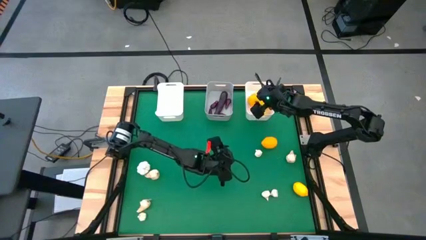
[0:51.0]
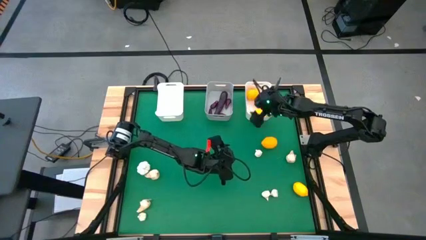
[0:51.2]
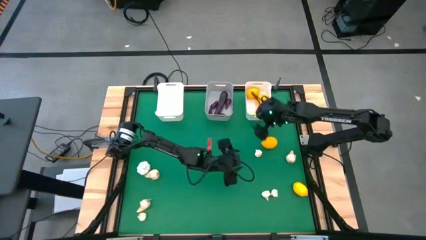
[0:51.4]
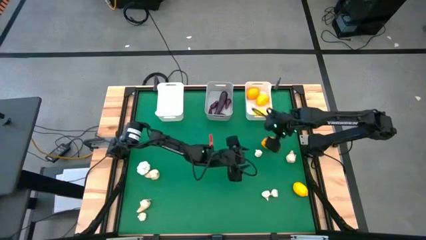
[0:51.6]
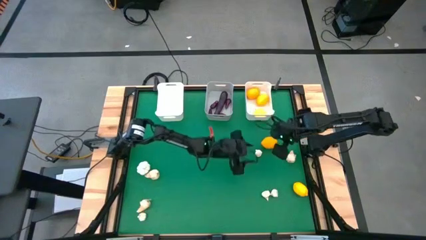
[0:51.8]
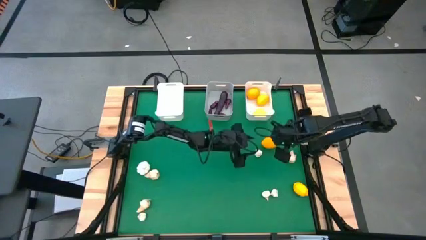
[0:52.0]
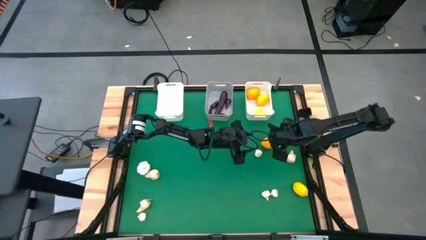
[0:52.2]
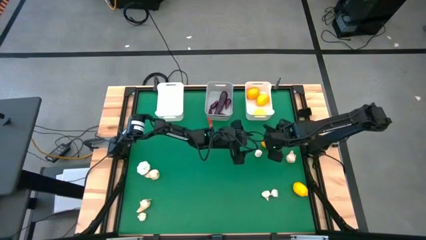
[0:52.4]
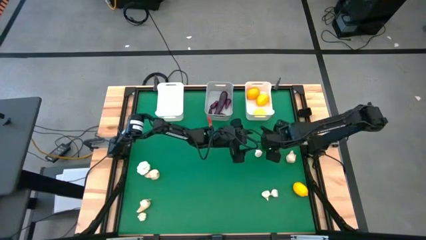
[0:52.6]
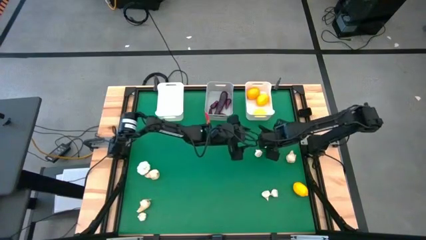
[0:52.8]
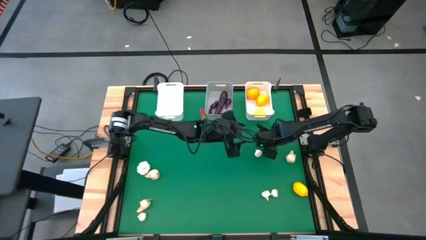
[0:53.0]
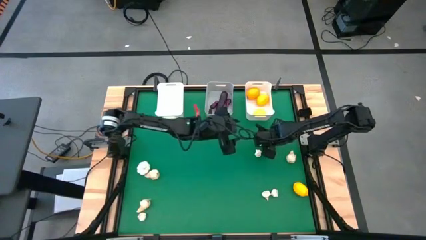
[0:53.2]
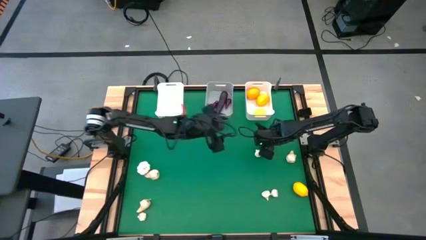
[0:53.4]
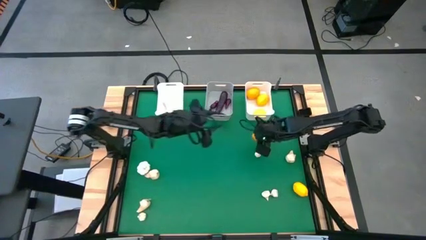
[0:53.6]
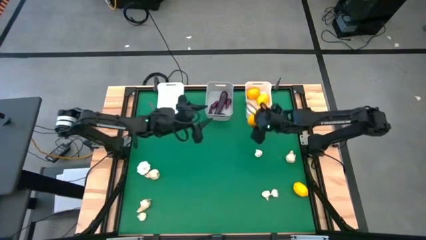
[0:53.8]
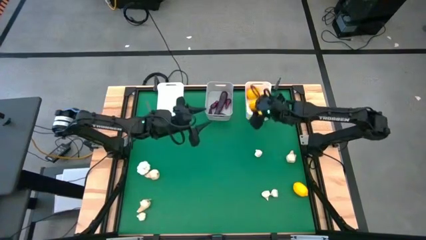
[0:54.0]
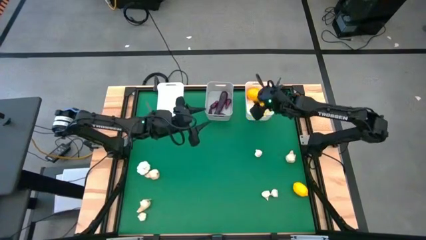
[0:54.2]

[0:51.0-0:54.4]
Task: Sort produce into baskets
Put the lemon into the right white bin

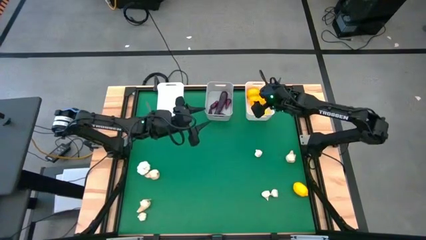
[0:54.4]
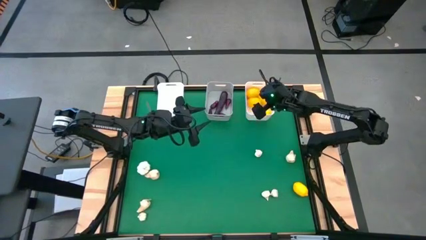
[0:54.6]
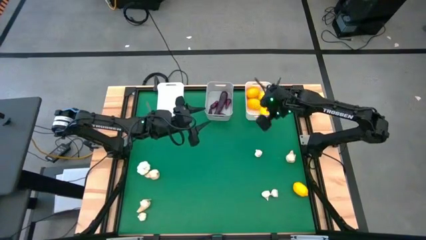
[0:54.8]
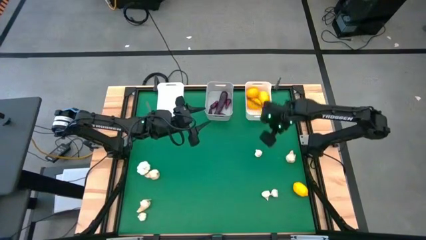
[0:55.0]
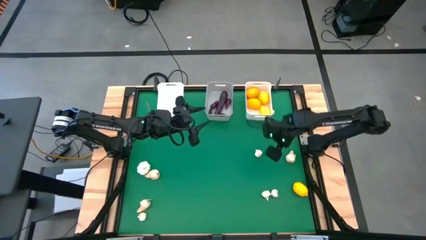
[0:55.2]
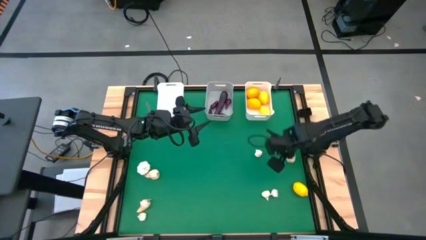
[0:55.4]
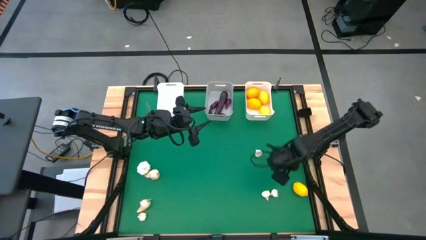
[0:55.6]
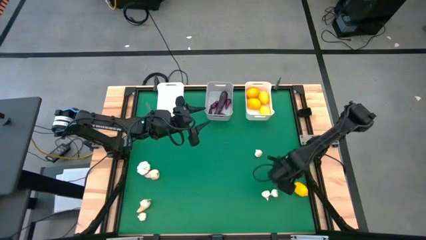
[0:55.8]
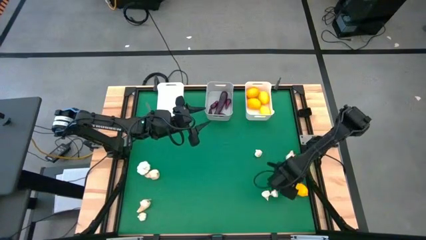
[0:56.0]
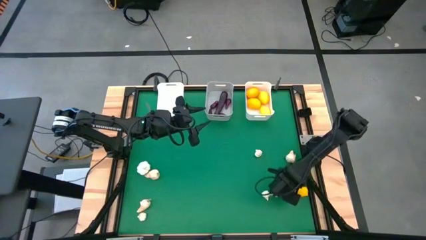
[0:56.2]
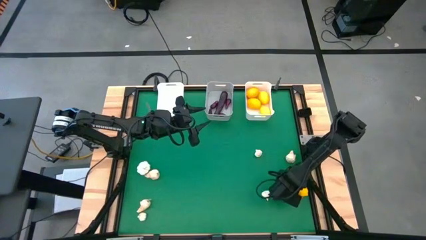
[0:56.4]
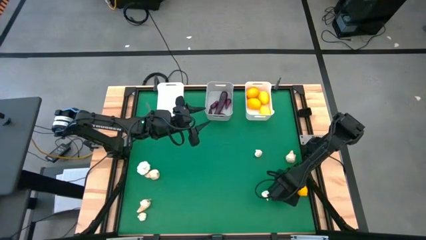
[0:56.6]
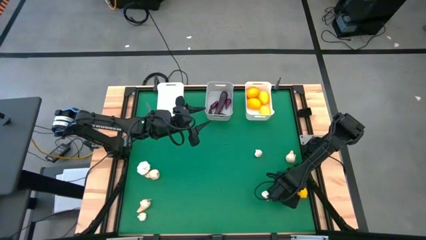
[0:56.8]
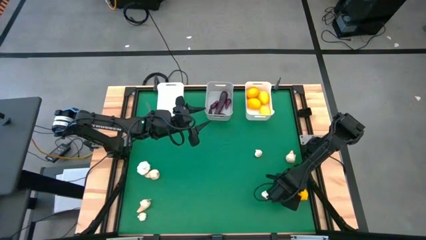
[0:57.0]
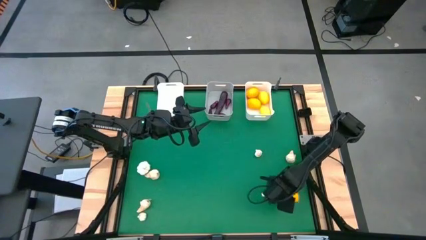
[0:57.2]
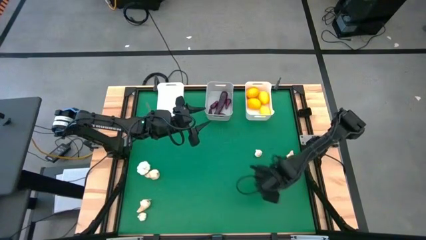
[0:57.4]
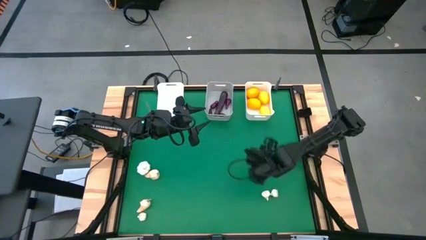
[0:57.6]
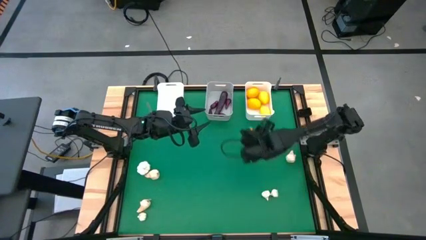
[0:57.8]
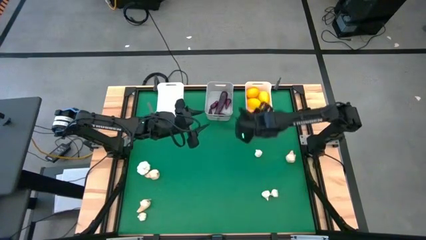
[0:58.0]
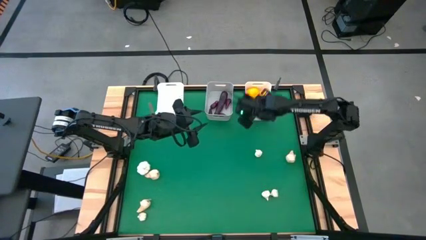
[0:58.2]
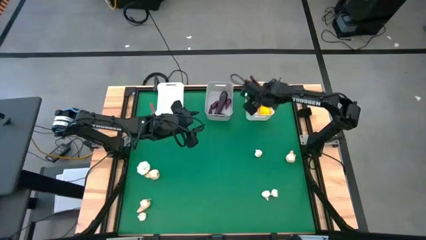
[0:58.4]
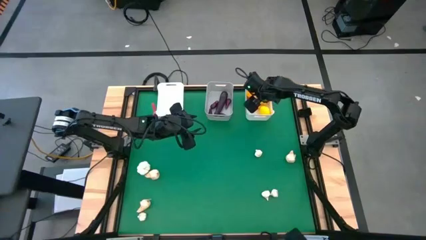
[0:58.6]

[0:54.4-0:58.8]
Put the lemon into the right white bin

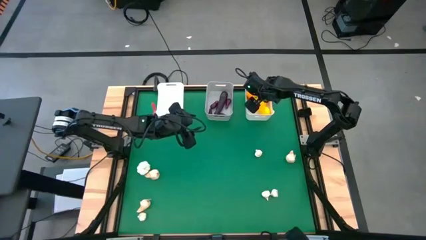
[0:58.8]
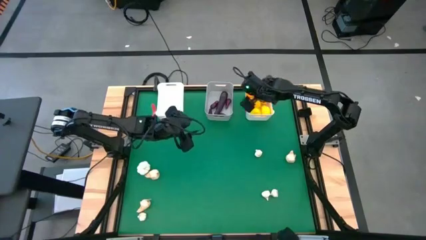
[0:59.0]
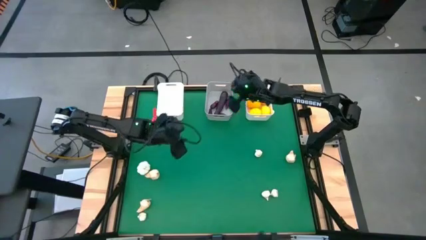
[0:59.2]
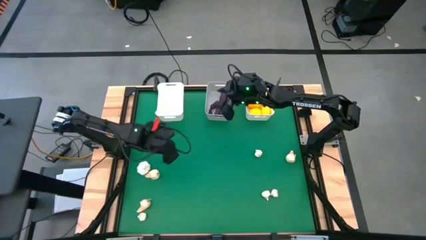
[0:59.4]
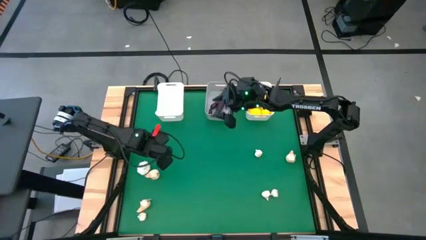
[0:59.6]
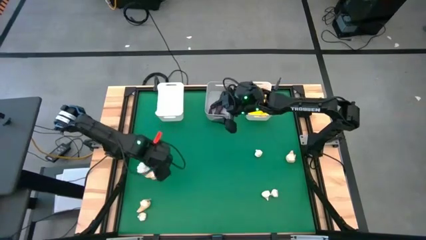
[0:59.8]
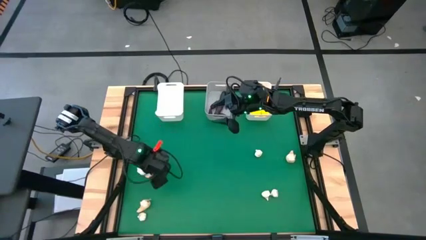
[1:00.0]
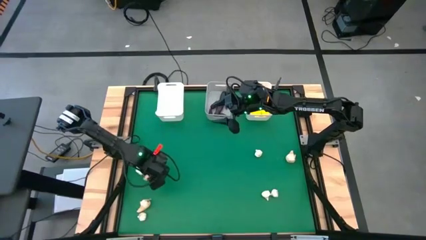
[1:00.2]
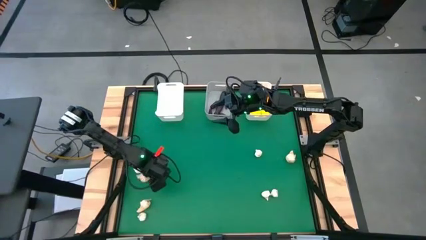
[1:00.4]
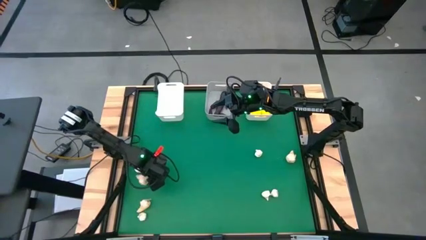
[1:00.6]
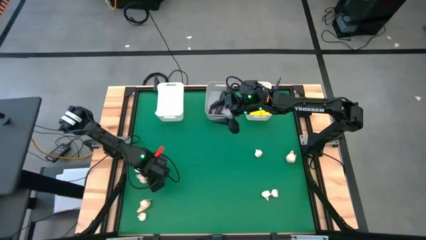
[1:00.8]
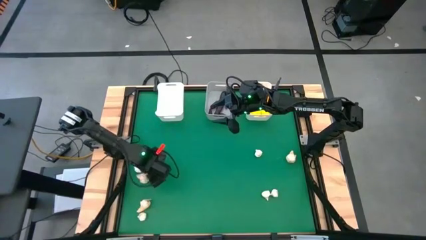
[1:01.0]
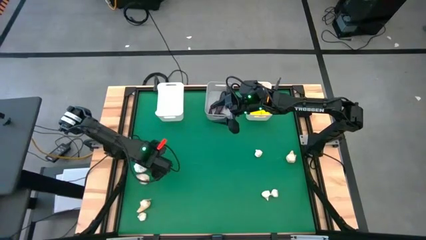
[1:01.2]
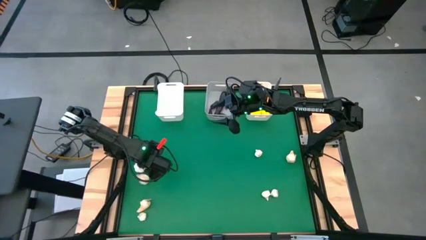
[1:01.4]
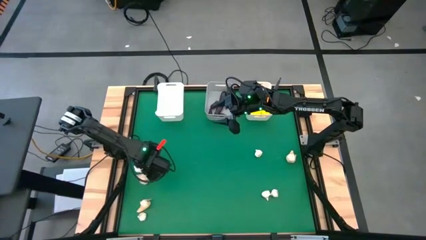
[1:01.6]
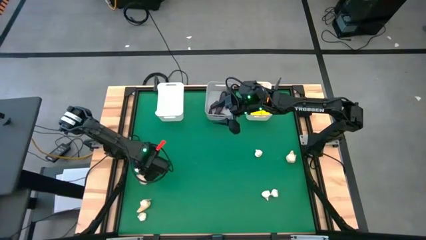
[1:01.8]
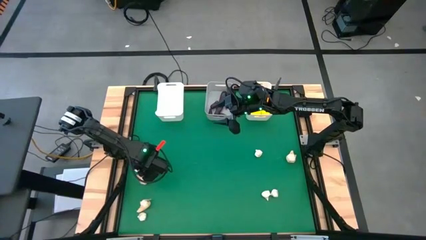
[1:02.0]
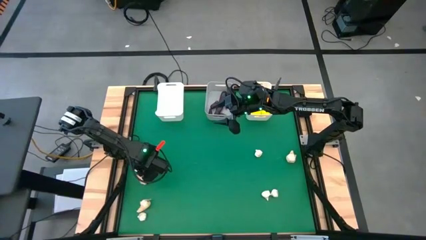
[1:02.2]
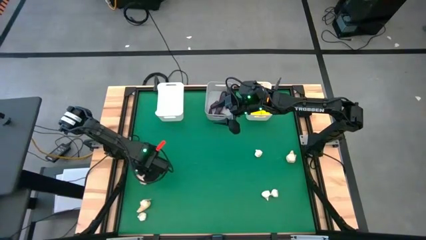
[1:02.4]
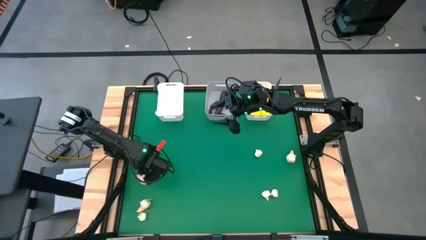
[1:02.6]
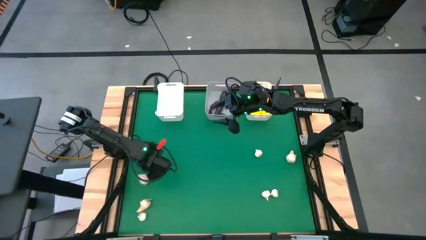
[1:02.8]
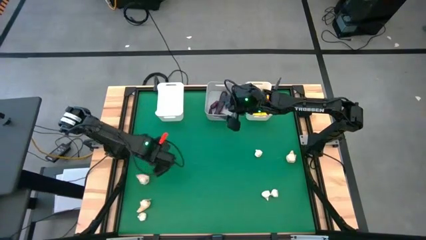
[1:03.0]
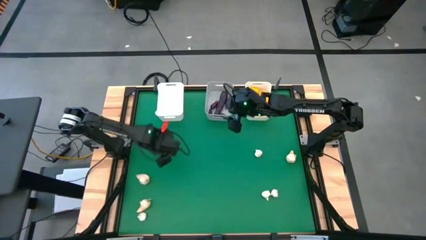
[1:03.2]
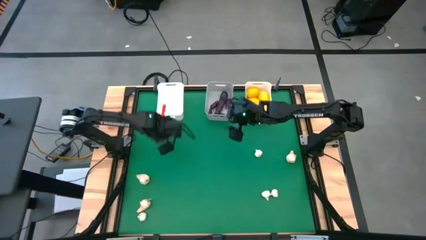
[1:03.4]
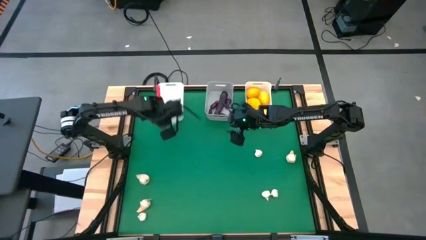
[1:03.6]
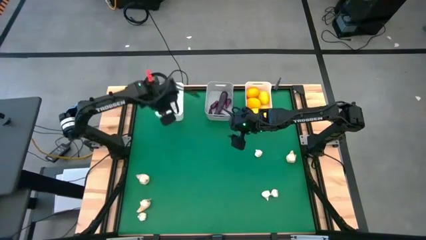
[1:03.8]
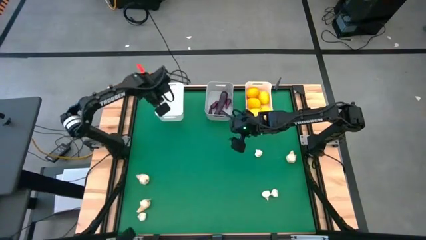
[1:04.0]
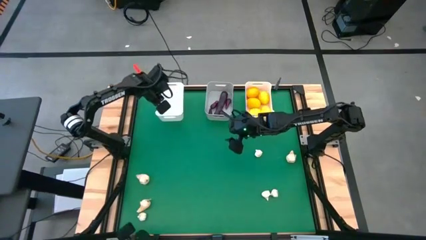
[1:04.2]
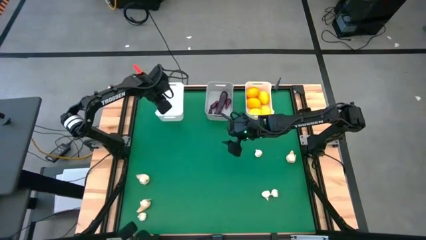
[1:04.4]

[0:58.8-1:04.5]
Put the garlic into the left white bin

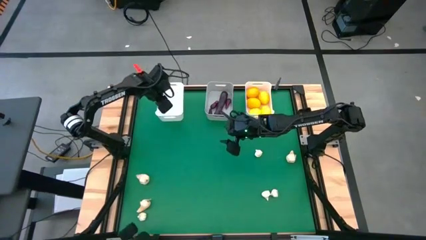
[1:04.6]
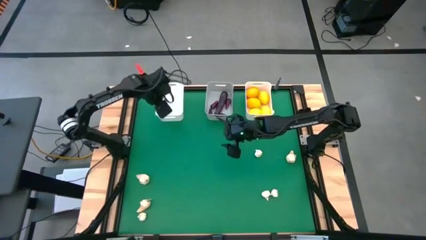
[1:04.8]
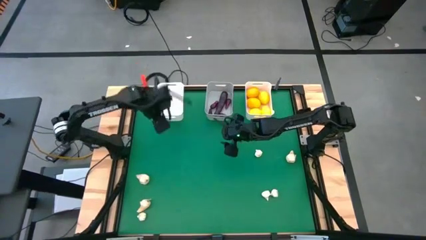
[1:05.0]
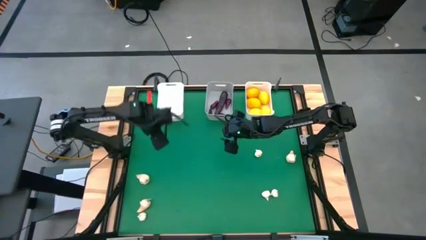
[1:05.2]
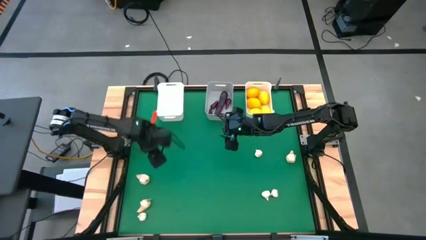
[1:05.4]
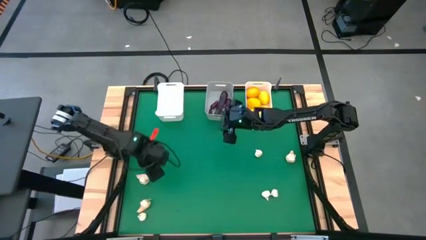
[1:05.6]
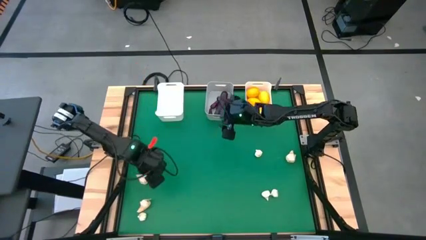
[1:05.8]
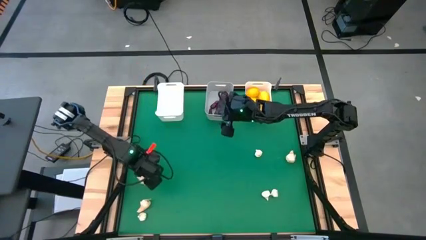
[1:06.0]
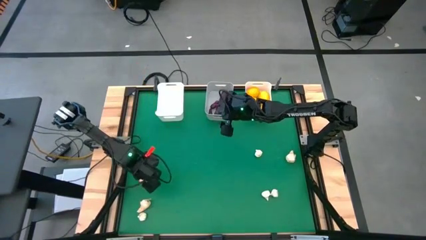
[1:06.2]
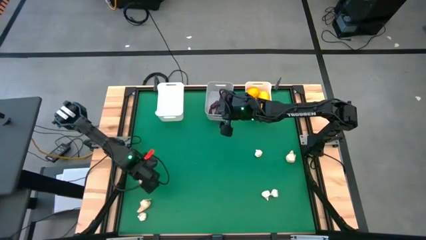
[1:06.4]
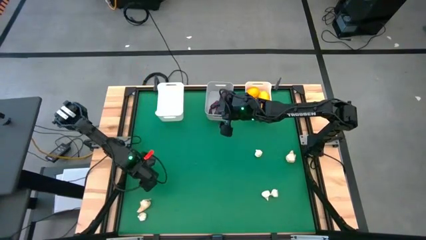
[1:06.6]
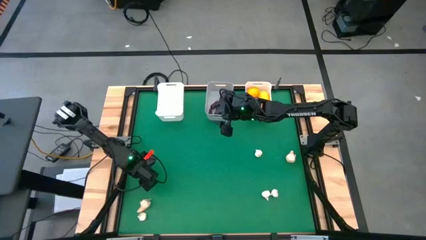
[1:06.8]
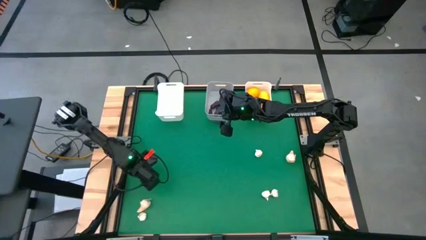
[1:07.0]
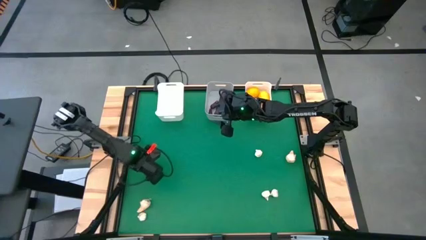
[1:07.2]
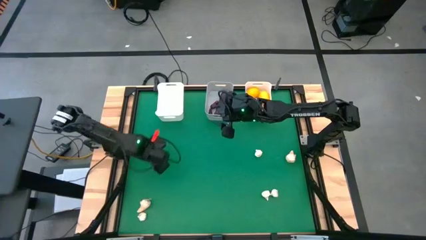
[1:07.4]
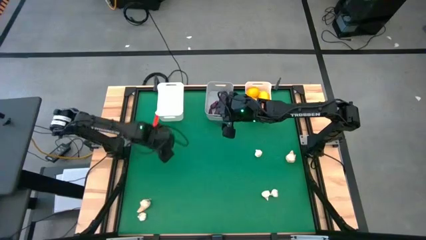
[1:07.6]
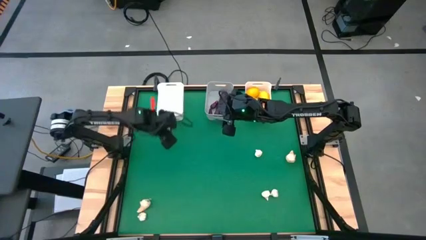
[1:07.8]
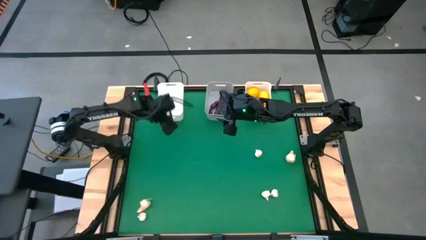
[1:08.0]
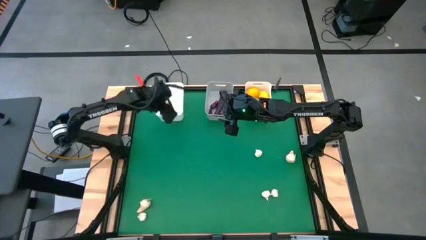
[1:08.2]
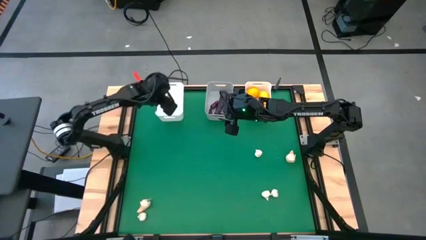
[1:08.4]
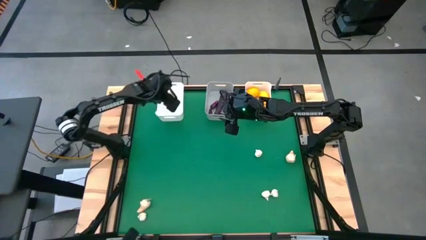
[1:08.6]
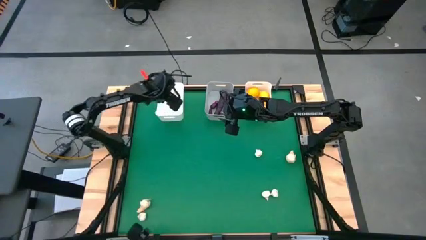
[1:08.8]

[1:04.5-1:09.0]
Put the garlic into the left white bin
